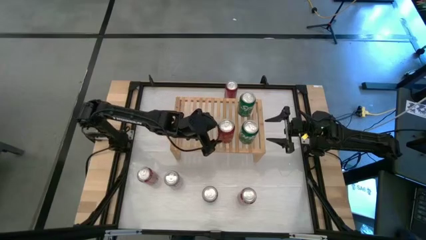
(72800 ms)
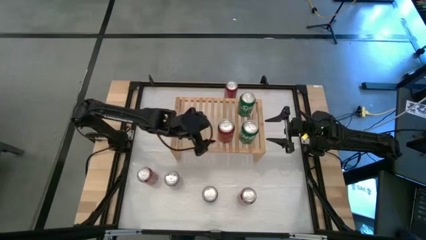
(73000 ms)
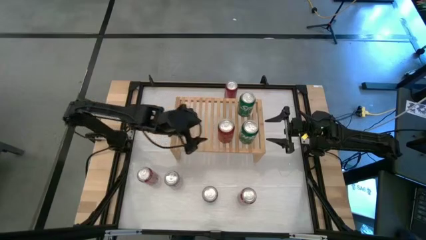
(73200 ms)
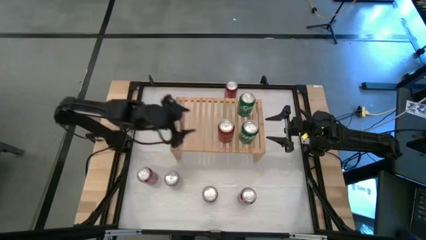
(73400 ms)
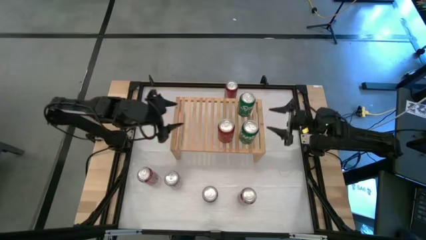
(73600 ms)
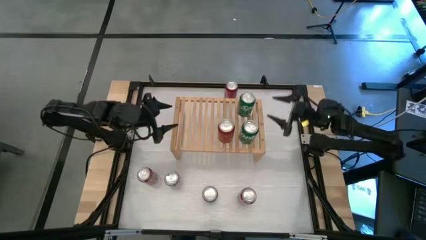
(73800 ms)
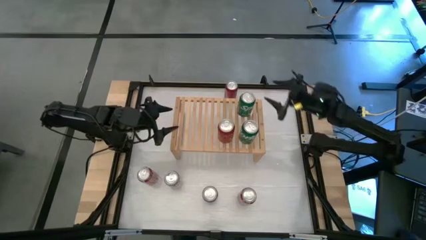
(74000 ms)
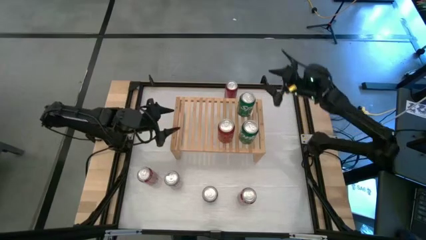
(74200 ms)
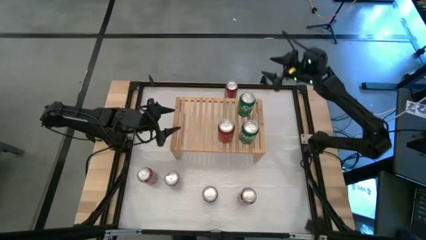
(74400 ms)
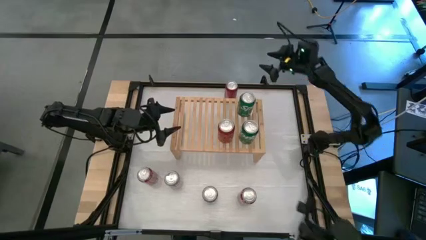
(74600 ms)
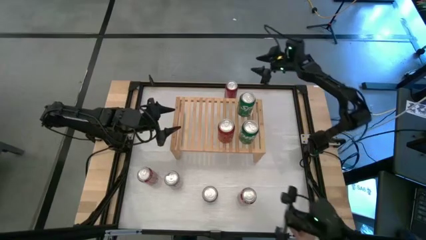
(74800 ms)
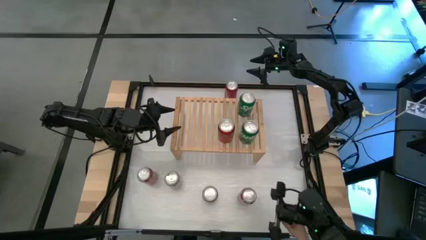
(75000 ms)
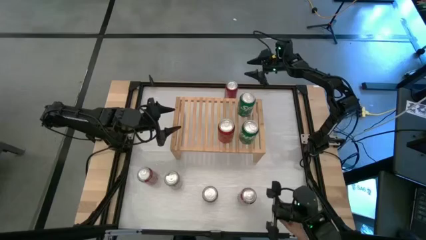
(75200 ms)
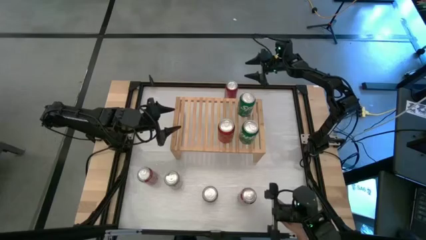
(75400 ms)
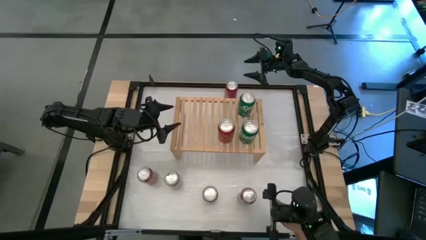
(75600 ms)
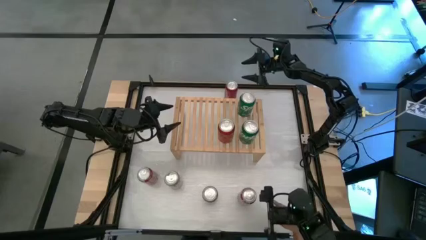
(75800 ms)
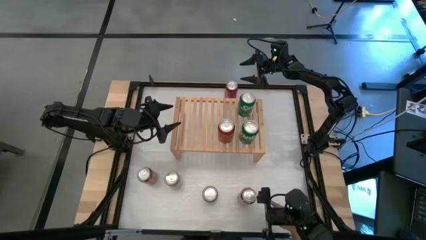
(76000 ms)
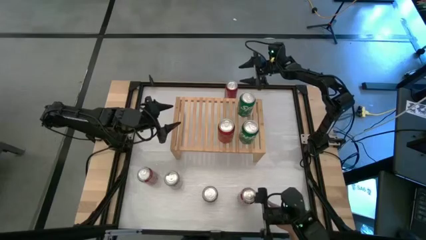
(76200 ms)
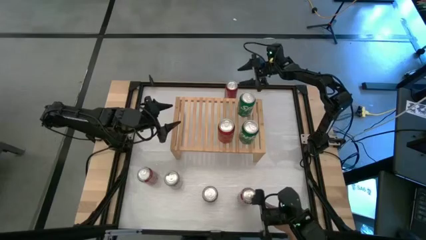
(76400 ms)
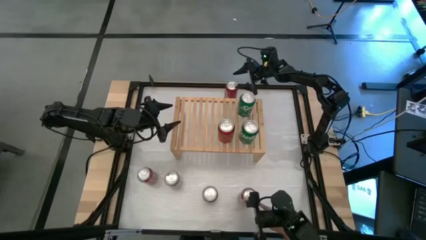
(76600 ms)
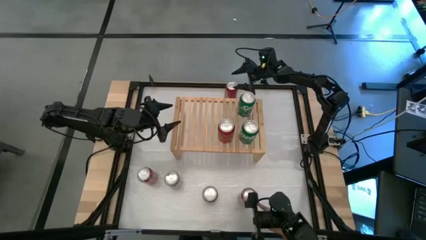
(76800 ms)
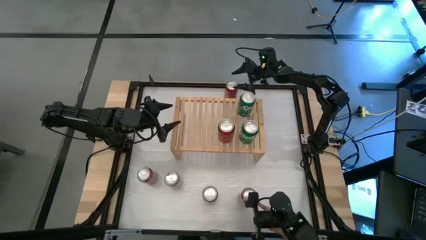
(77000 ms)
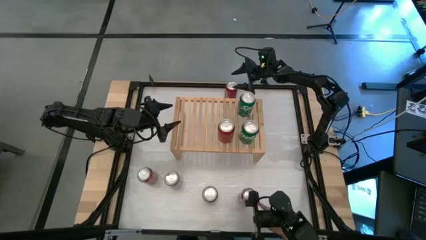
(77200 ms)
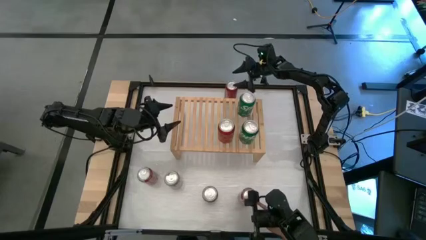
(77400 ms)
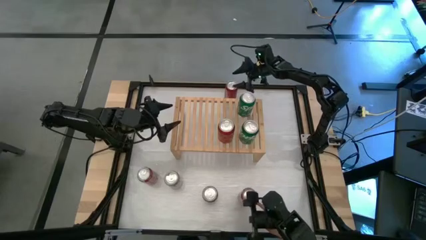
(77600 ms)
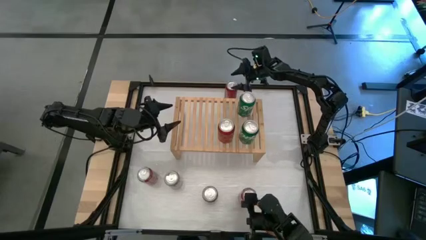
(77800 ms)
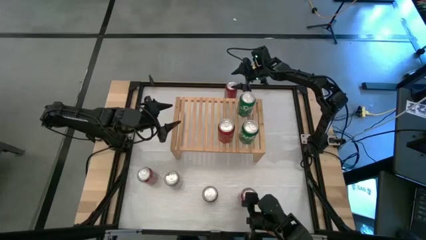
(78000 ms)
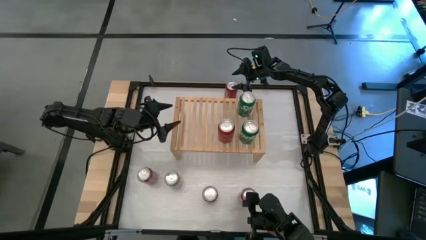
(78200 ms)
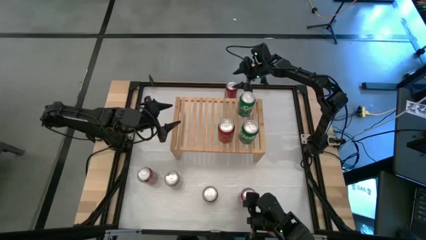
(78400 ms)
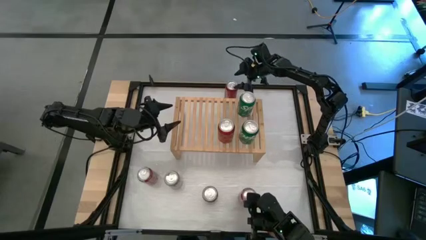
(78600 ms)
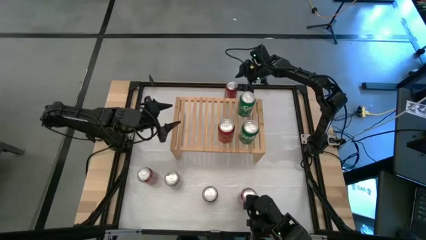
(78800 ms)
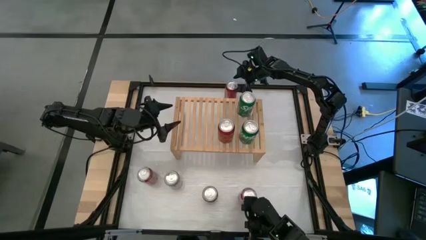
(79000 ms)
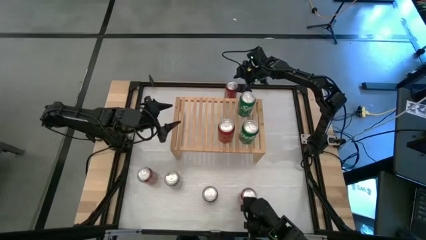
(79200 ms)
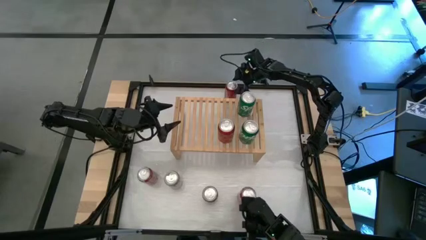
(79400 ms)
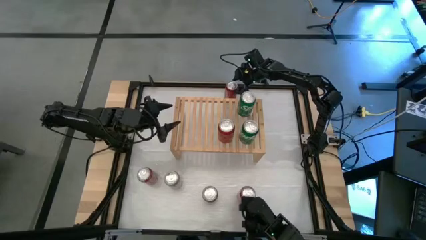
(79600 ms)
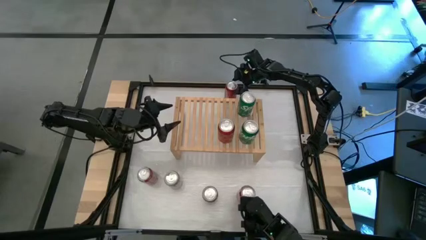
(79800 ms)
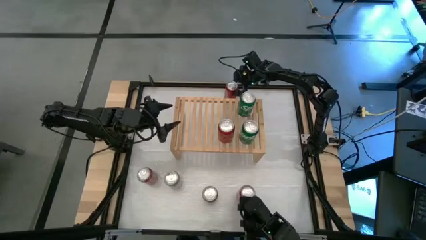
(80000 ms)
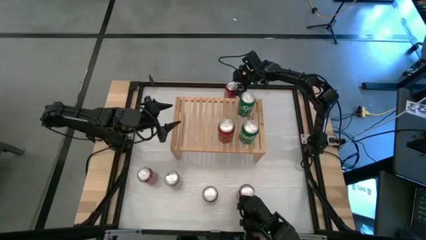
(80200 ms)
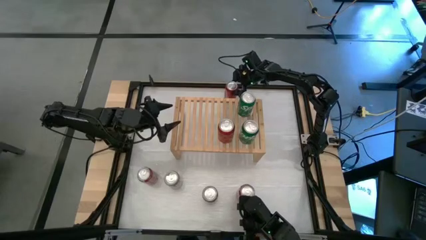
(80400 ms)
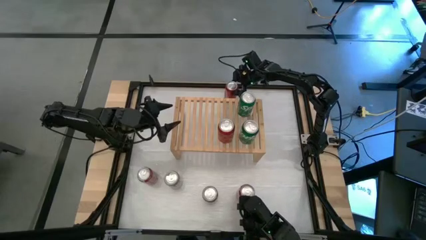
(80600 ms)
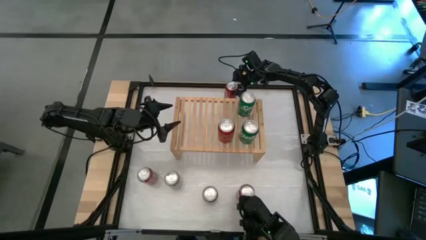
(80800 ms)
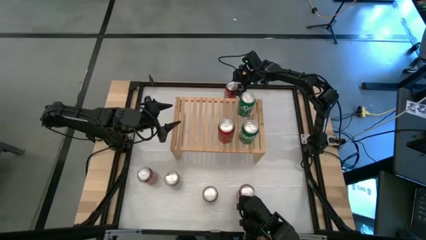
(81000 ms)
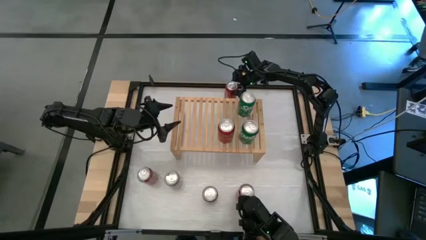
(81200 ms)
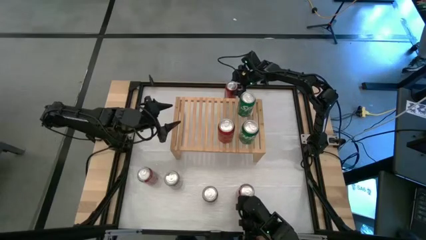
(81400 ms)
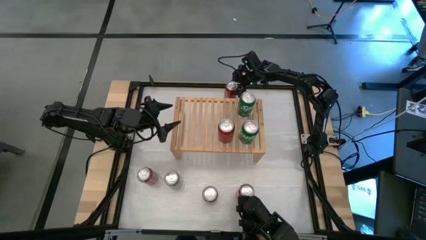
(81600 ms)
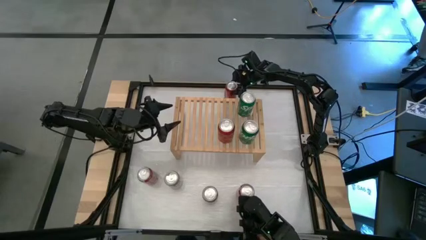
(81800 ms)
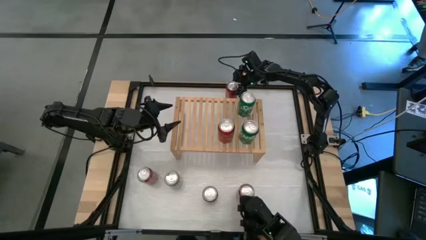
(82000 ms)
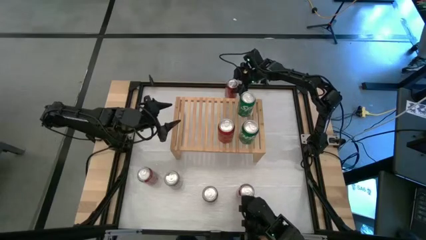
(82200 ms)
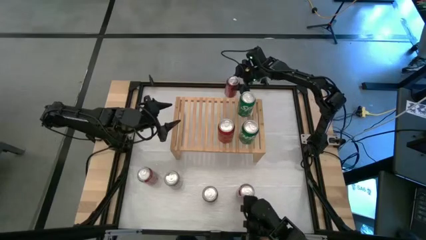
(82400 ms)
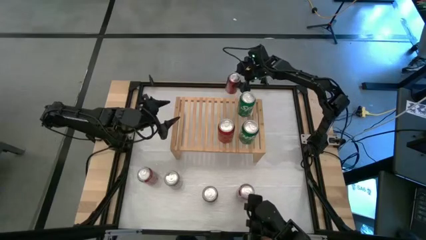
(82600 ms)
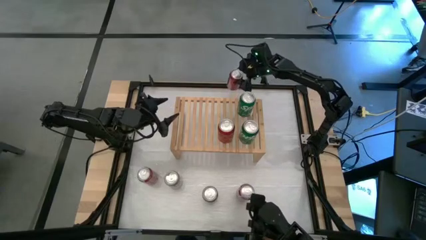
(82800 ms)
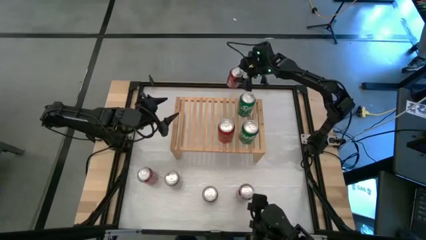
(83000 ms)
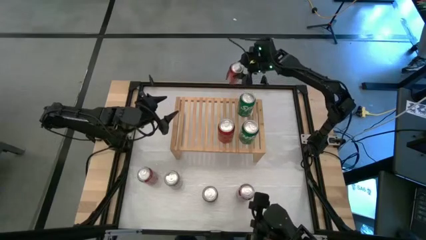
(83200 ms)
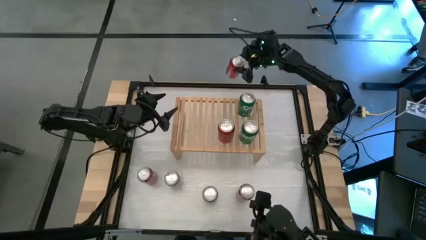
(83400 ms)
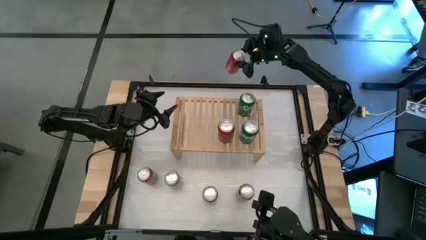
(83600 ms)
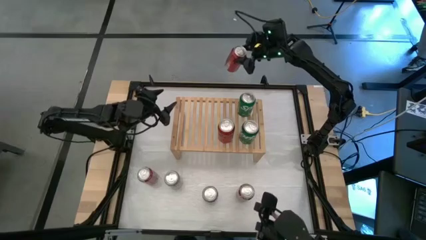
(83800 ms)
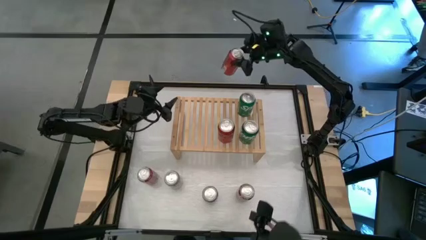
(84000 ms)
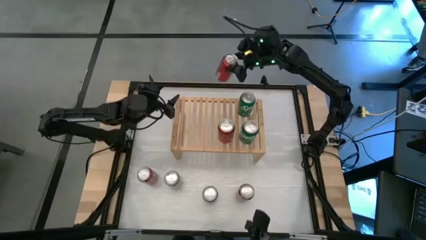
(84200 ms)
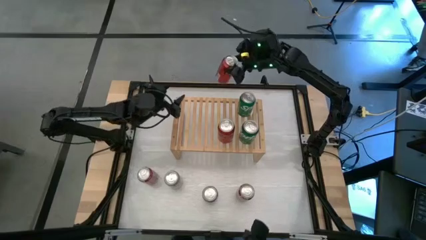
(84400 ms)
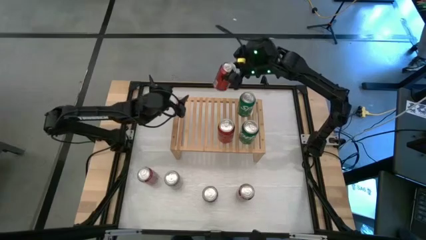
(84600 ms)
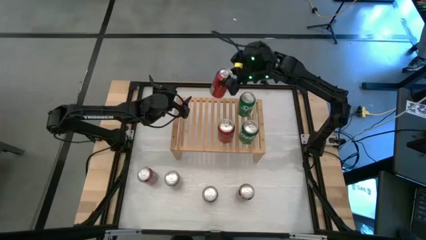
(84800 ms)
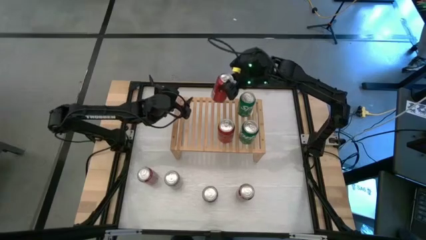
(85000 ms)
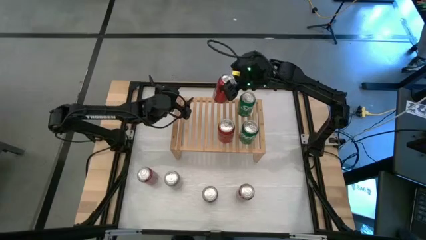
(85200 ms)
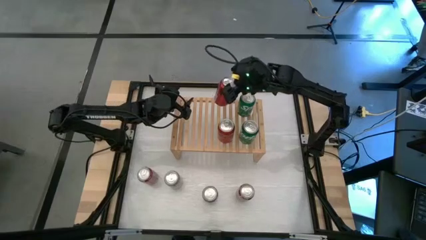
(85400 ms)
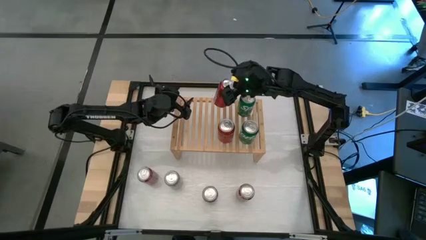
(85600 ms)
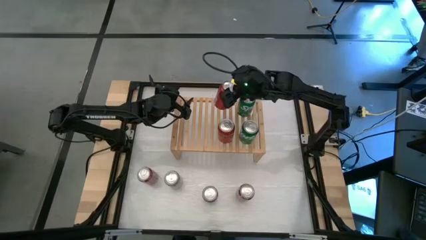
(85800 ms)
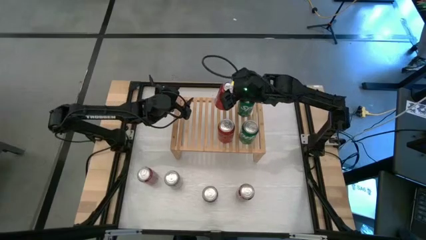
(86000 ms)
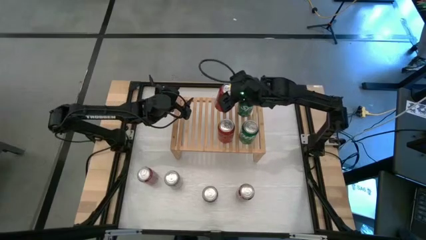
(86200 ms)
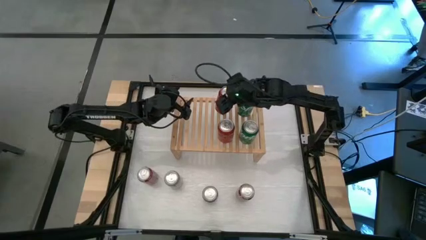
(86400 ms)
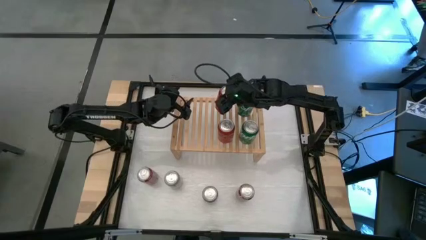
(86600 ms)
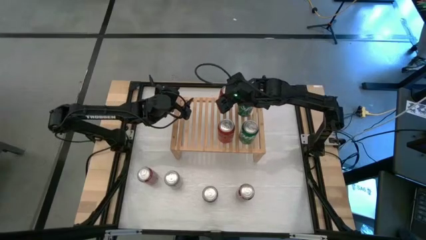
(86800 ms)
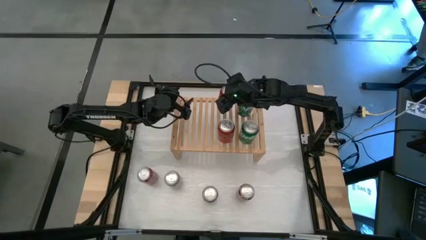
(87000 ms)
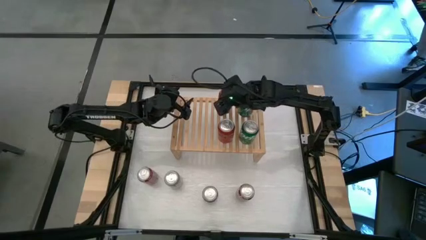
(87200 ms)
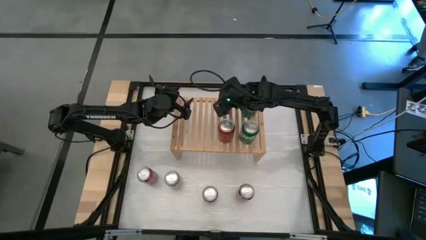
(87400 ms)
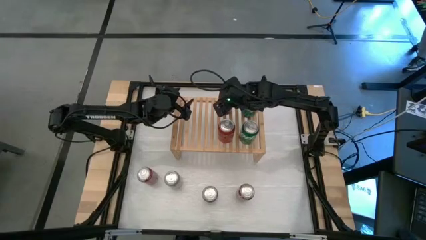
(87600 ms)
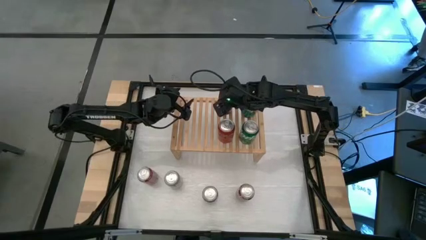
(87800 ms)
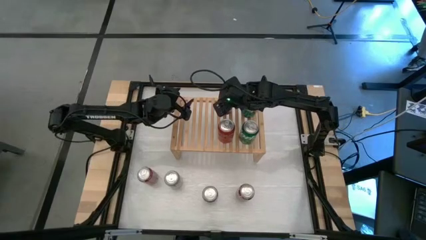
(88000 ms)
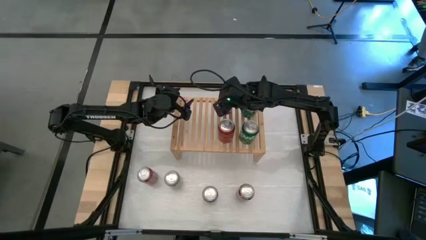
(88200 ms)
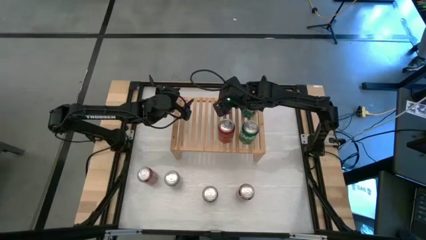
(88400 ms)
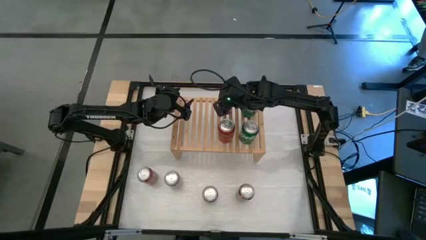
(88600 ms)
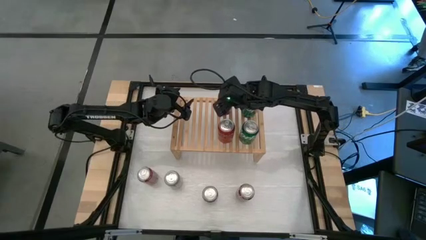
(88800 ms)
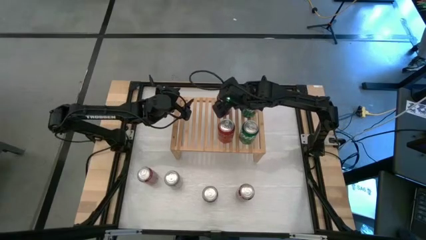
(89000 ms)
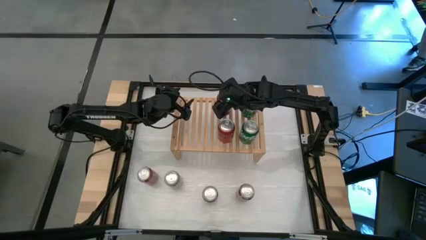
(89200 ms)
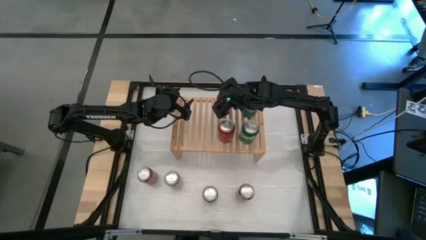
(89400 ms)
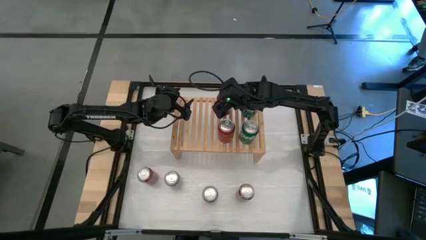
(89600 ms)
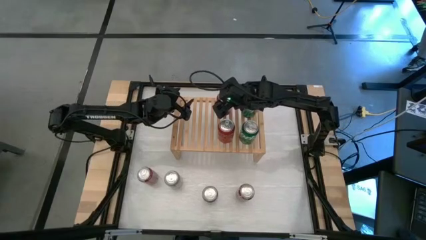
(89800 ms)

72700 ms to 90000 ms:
Task: Place canned beverage on shelf
Put the red black soda can on the shelf
